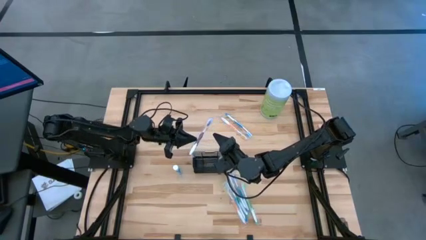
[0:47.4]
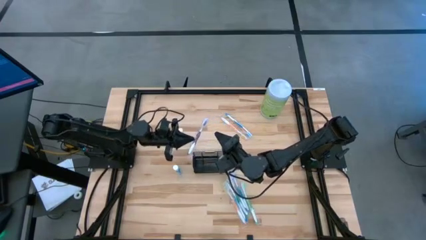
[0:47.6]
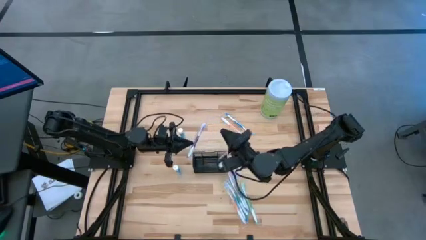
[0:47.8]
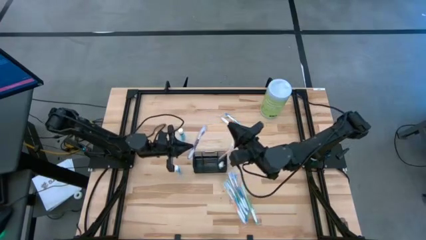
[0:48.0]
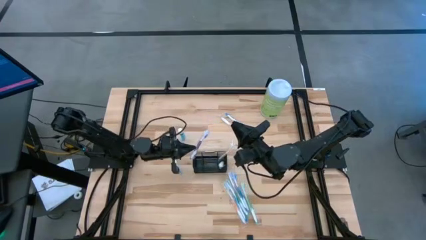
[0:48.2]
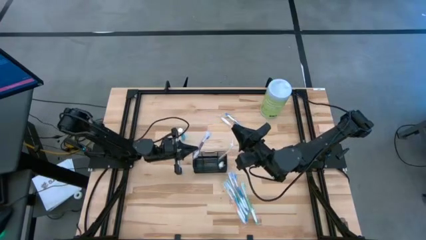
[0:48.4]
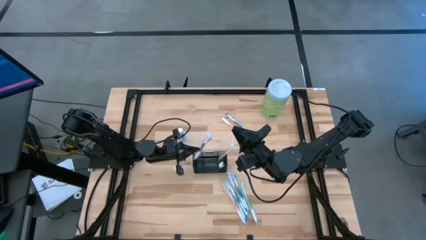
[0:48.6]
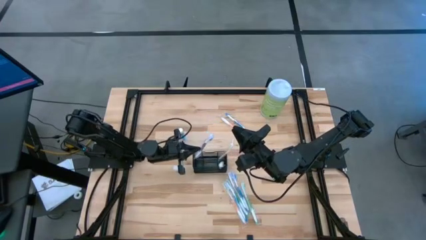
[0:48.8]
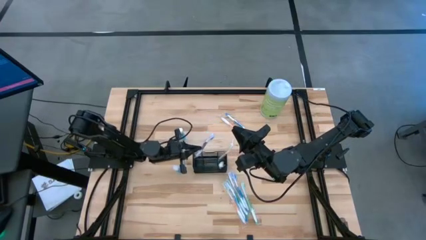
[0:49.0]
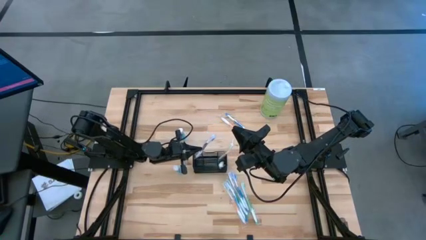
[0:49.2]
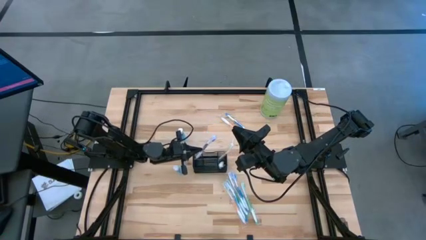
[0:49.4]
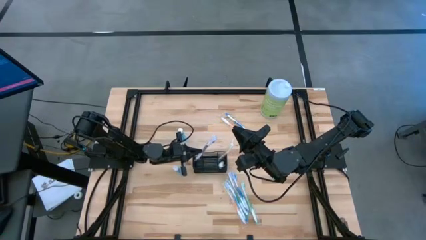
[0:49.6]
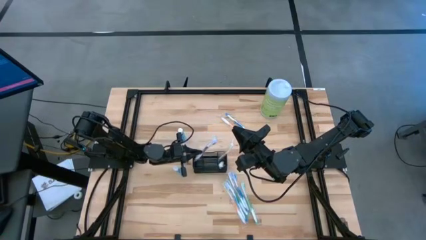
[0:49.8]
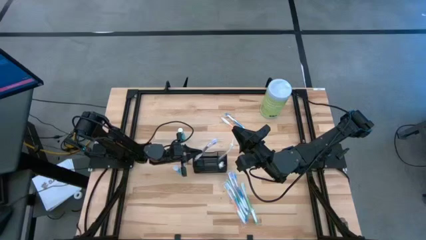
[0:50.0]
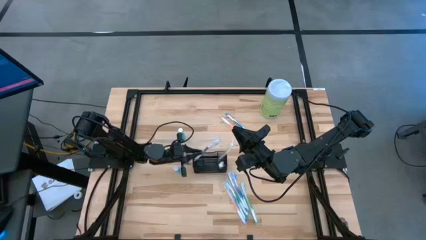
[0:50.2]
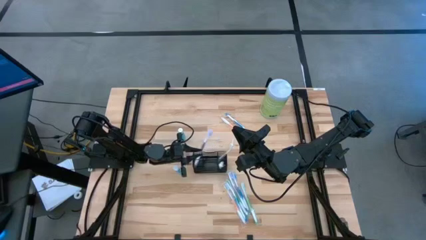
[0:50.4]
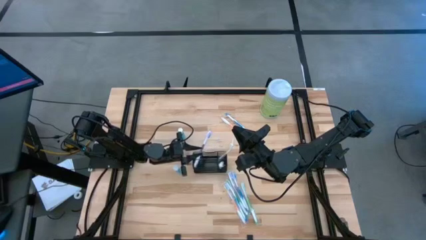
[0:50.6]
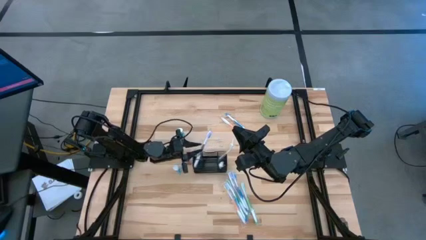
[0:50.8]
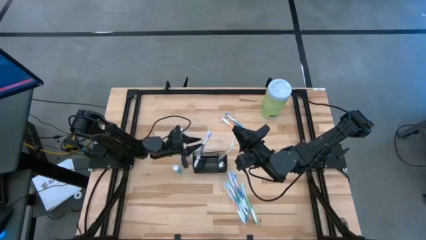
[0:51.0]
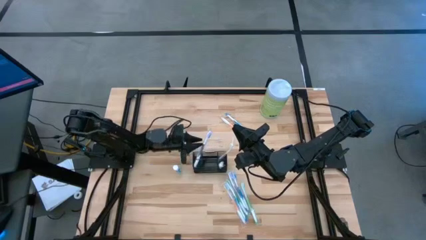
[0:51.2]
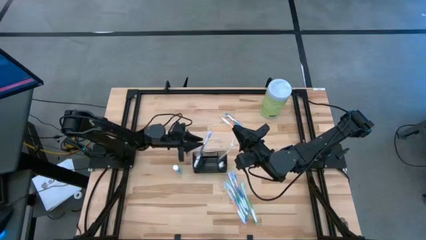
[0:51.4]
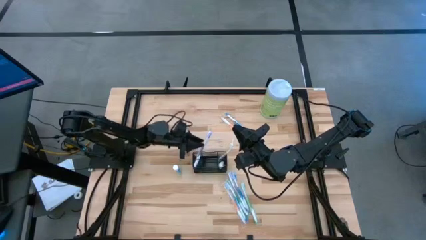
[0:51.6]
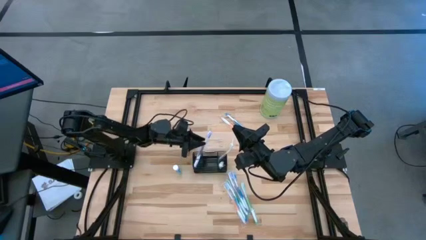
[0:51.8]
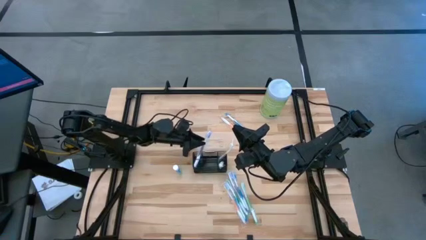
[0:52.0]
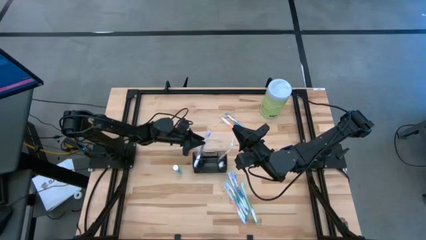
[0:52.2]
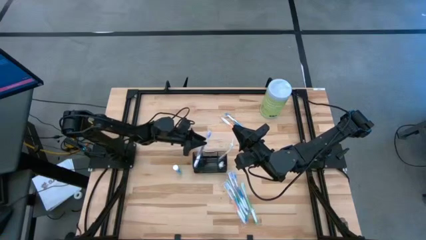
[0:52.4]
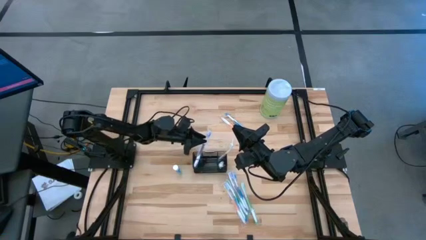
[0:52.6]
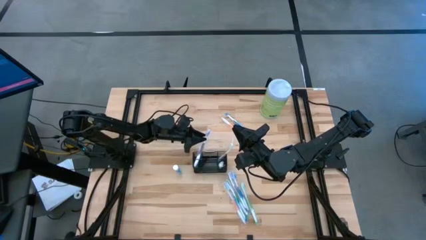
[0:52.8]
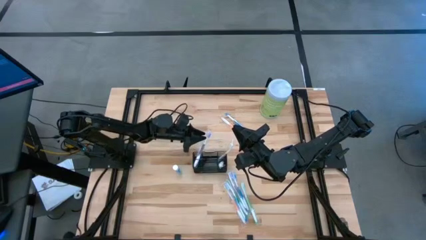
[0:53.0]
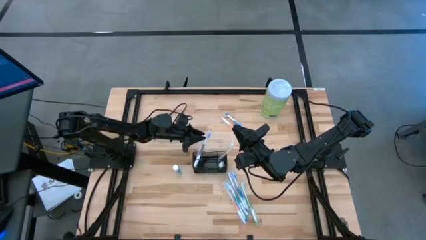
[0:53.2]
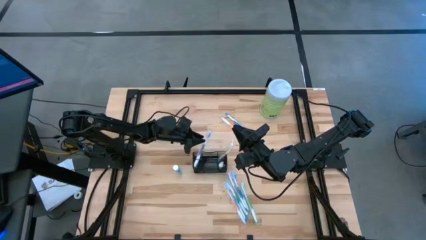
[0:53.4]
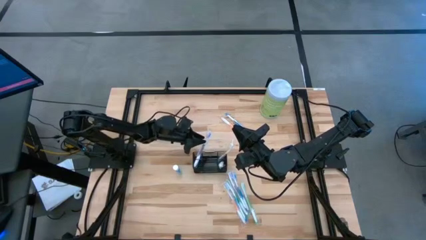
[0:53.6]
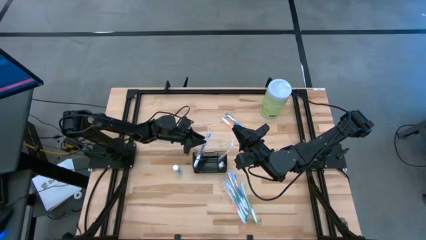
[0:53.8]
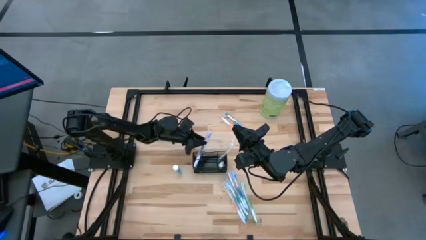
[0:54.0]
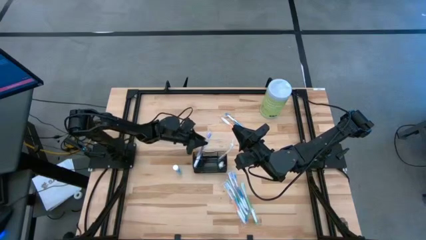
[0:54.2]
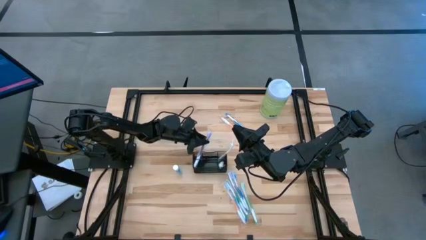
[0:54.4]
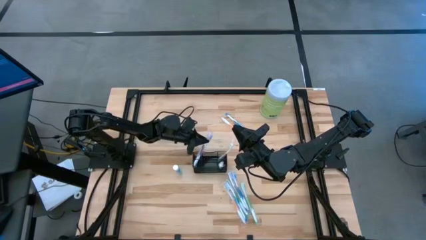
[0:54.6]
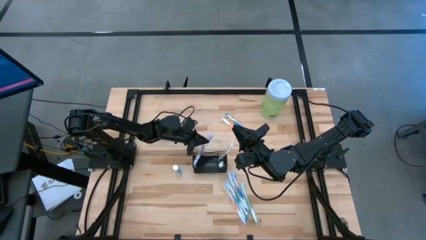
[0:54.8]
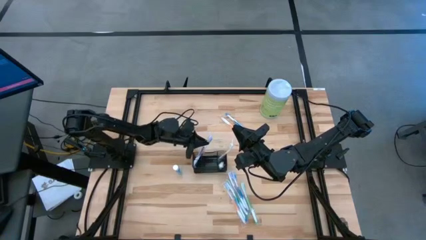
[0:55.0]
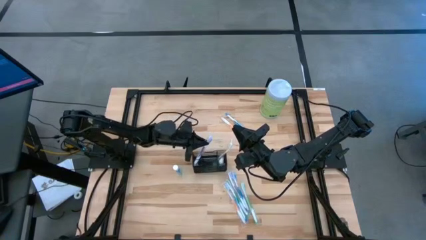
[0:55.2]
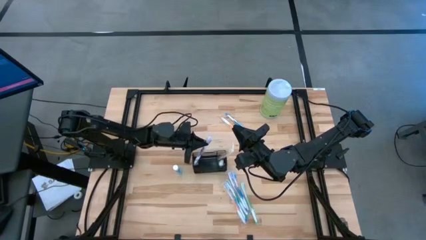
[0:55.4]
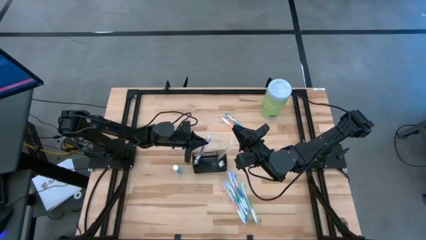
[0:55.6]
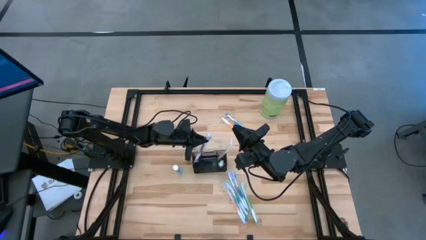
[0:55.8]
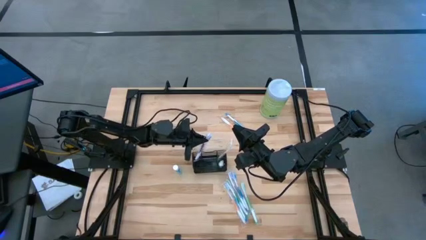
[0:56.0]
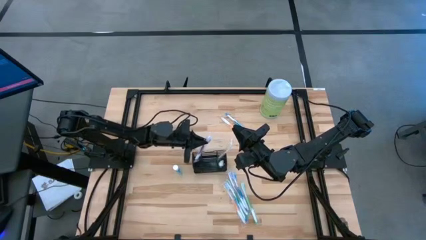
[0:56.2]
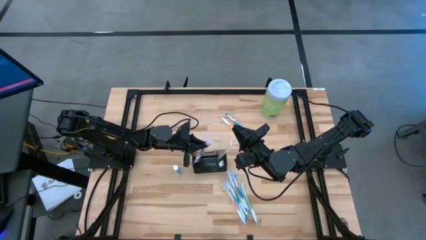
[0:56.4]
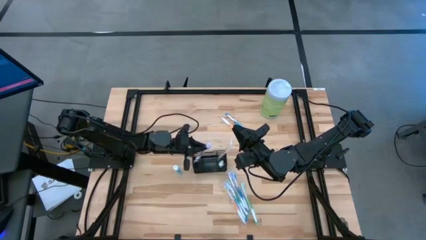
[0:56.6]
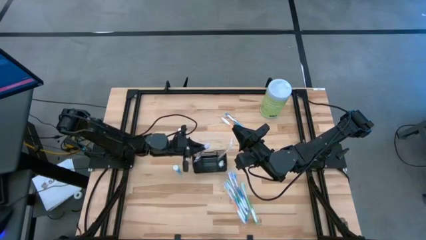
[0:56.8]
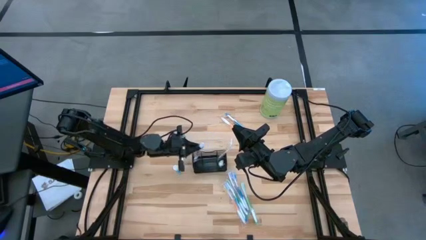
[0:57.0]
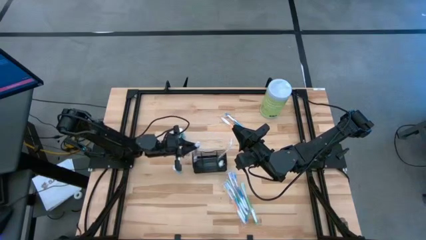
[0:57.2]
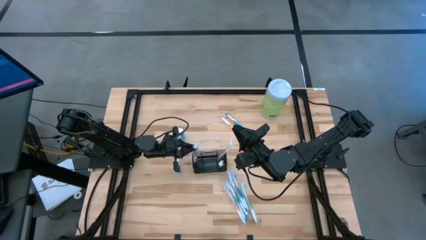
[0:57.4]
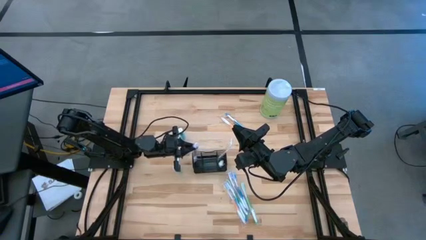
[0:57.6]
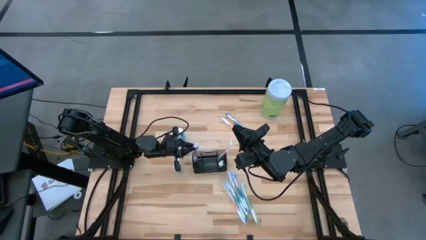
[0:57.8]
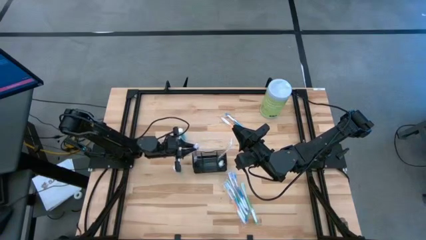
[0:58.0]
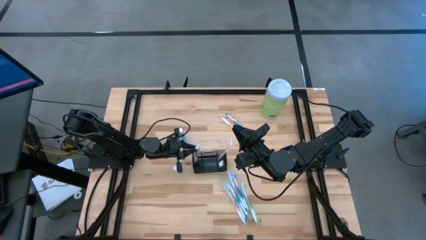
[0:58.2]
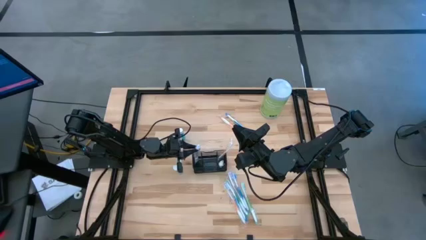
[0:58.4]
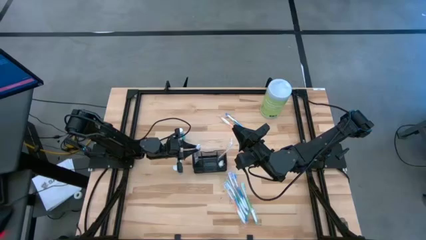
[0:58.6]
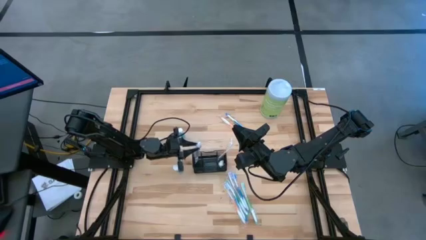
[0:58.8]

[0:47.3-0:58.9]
Task: Pick & Place toothbrushing station
Put the purple toothbrush into the mesh

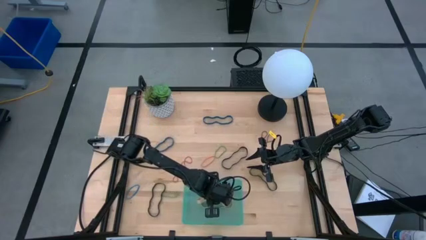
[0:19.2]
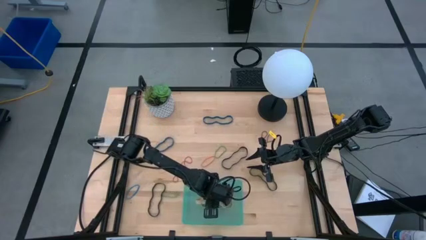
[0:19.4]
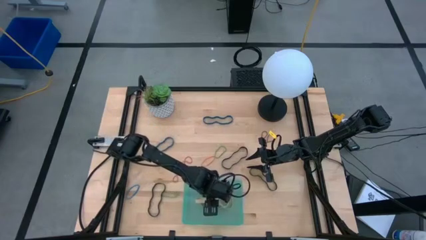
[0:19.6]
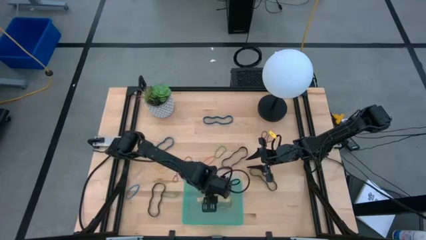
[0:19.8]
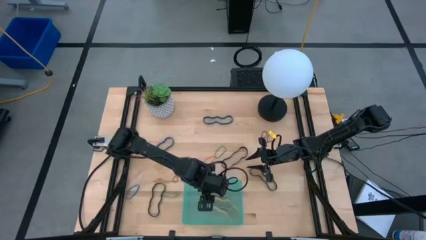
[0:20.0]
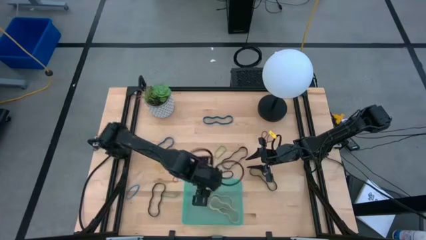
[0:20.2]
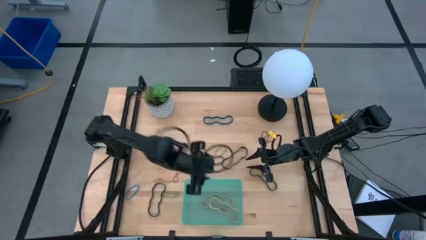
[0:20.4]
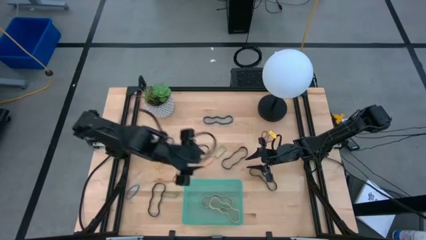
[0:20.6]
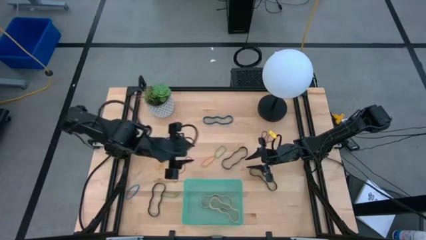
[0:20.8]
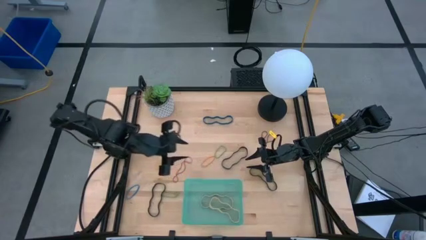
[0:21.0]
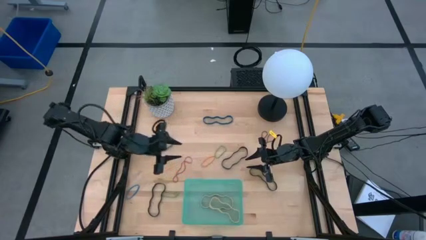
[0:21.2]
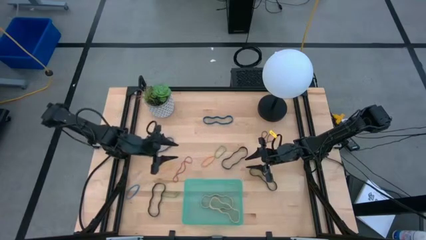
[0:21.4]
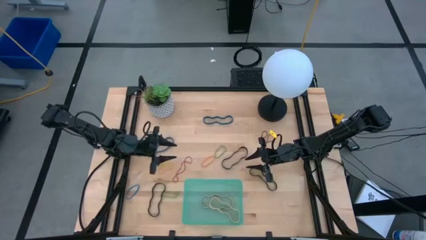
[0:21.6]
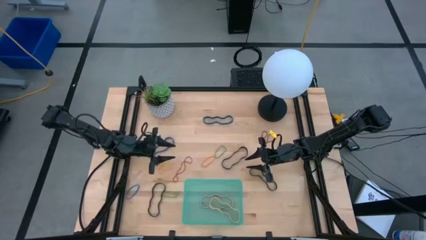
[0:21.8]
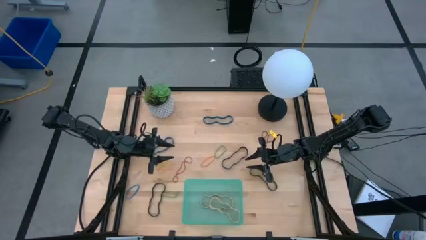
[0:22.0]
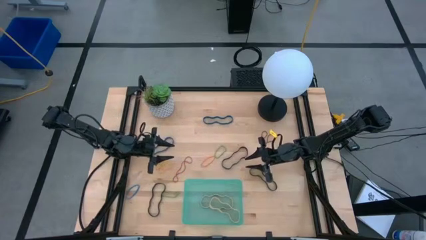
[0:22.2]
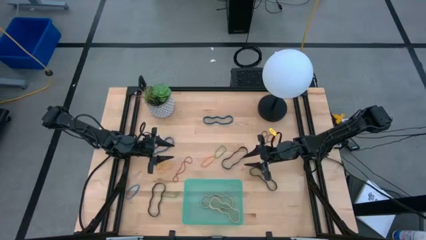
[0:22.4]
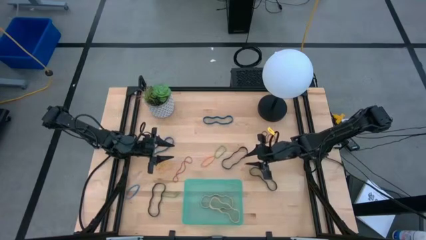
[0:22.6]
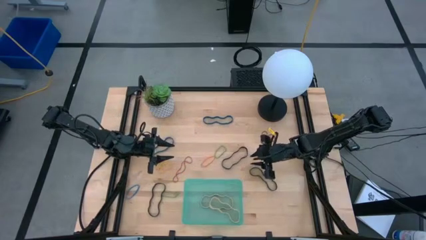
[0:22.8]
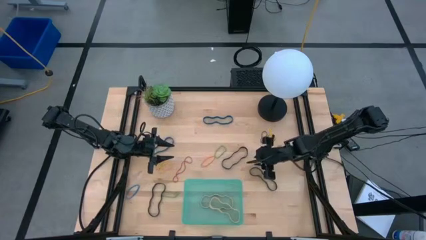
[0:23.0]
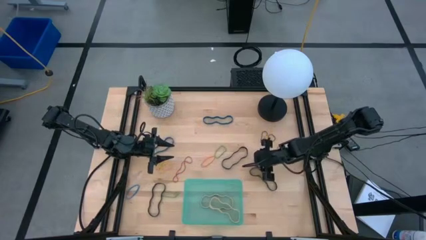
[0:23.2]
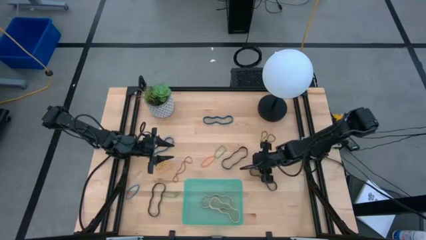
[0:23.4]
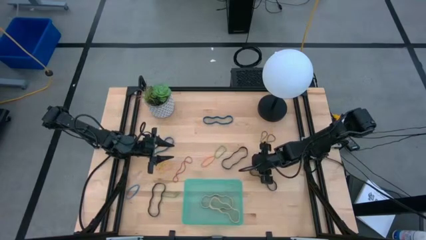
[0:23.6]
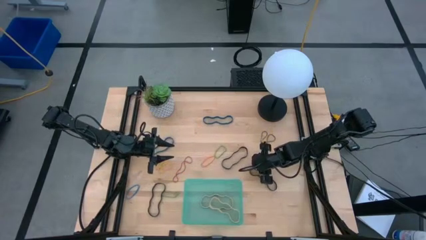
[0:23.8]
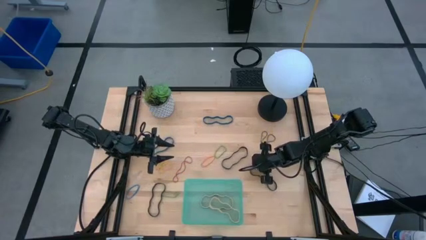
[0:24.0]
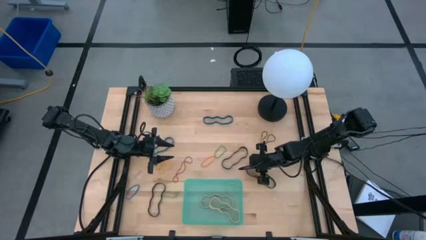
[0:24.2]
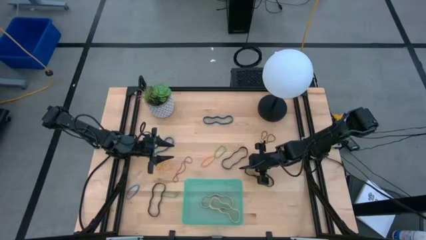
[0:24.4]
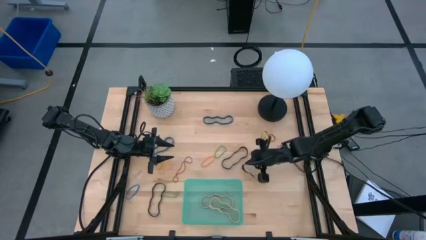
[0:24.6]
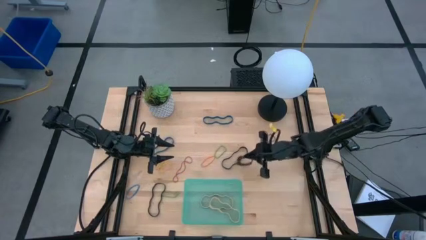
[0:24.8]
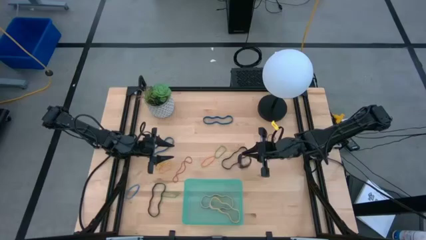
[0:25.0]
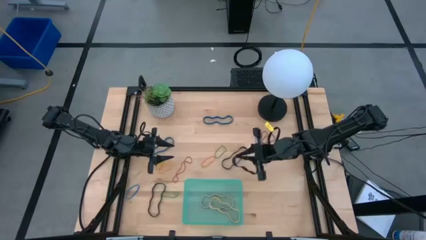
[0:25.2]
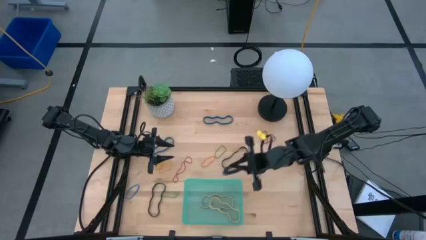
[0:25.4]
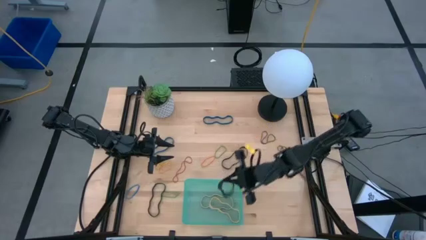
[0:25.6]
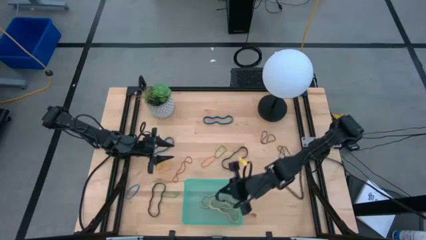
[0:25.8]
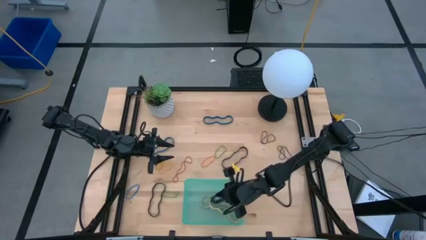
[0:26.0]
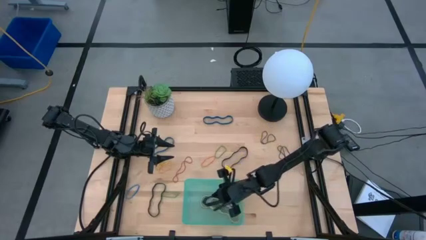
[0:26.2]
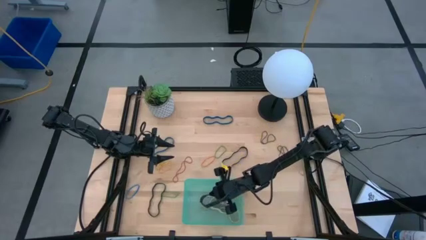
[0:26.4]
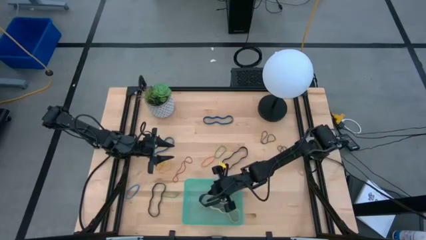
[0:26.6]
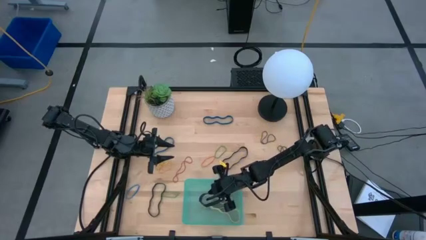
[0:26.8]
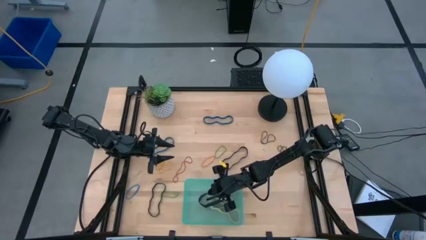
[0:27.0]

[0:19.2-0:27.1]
Task: Pick and place rubber bands into bin
Put the top right large black rubberband into the green bin
